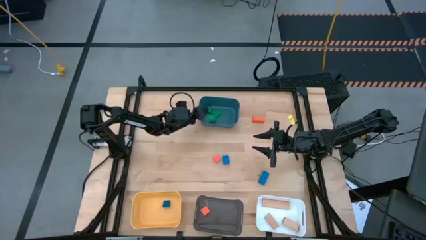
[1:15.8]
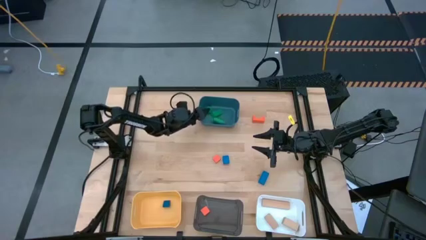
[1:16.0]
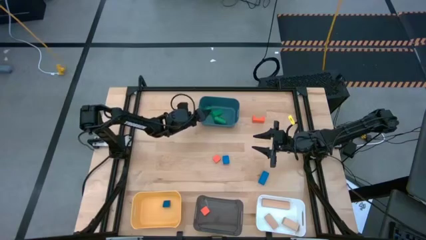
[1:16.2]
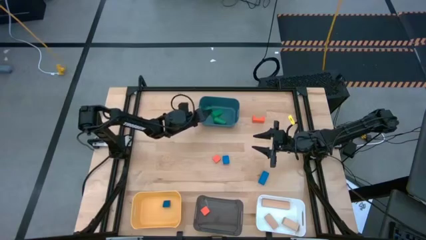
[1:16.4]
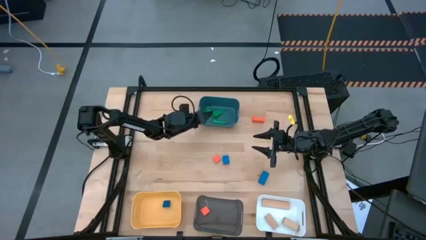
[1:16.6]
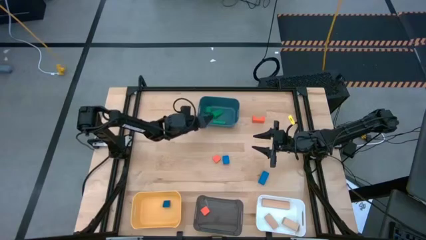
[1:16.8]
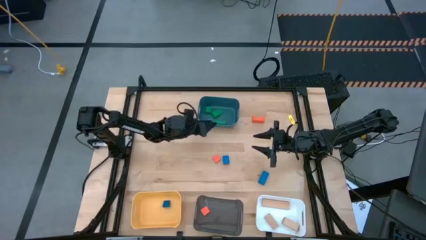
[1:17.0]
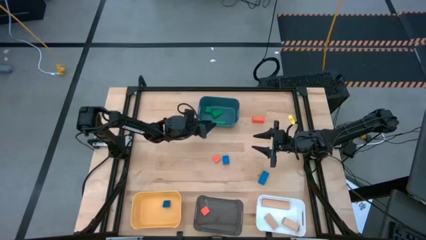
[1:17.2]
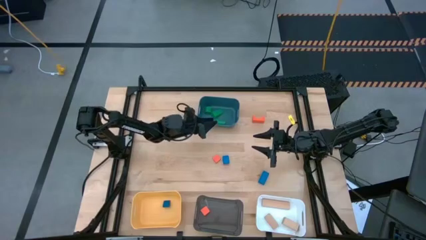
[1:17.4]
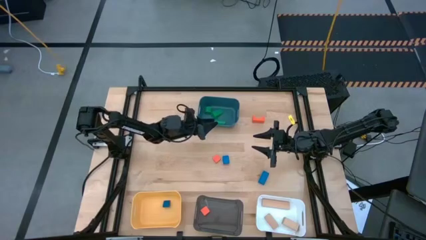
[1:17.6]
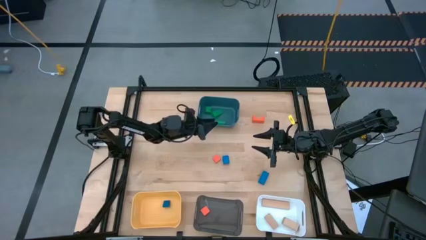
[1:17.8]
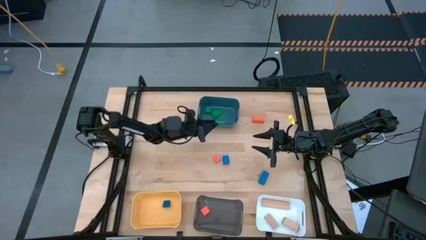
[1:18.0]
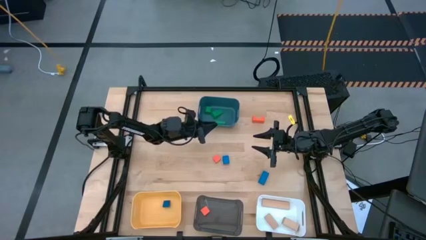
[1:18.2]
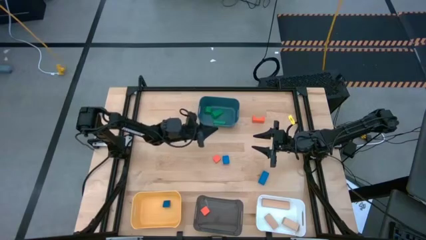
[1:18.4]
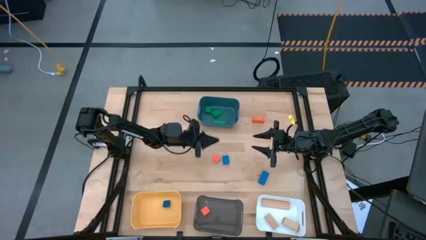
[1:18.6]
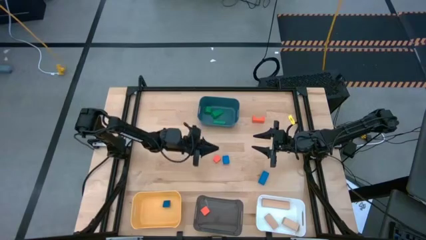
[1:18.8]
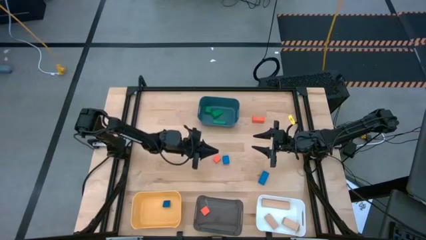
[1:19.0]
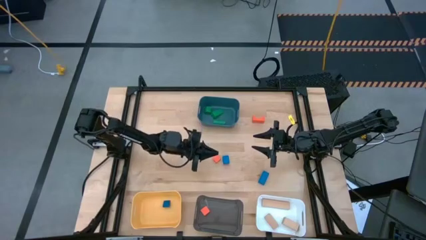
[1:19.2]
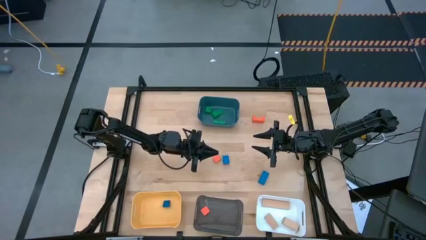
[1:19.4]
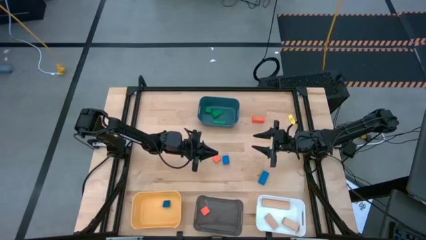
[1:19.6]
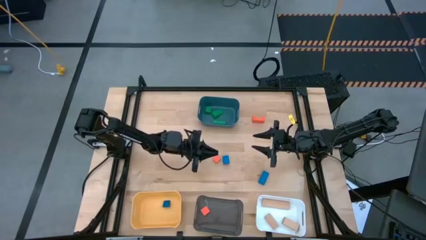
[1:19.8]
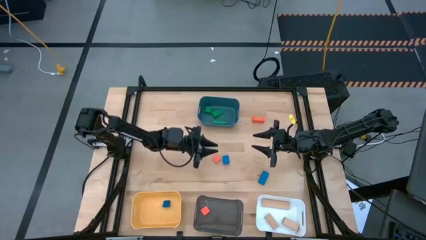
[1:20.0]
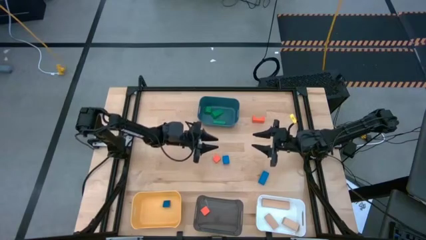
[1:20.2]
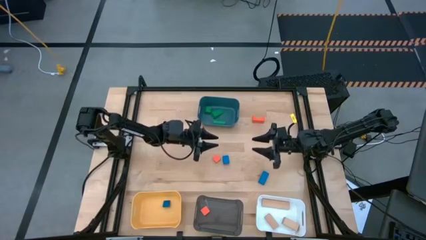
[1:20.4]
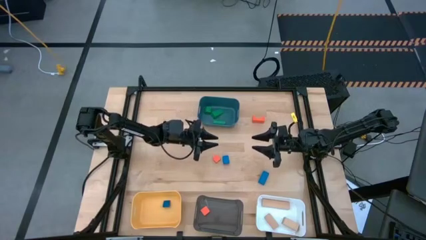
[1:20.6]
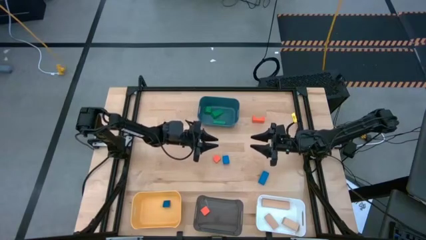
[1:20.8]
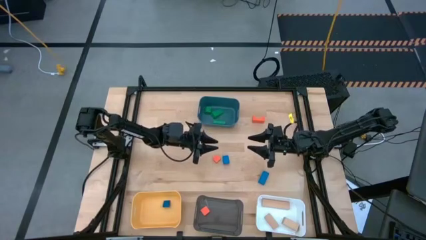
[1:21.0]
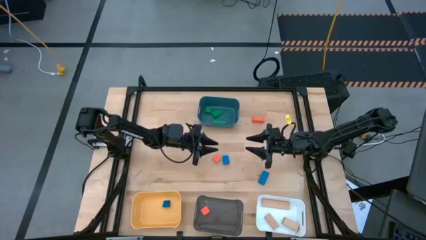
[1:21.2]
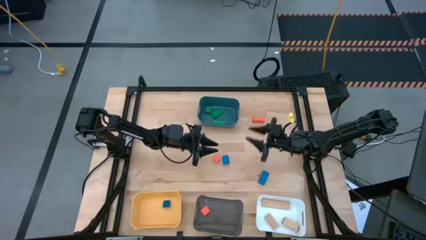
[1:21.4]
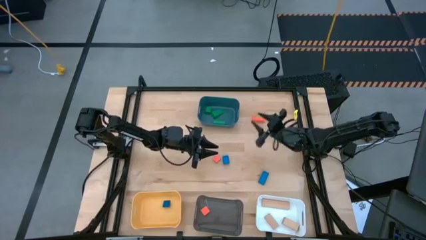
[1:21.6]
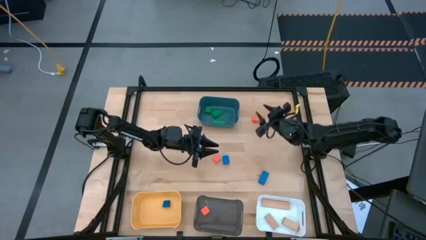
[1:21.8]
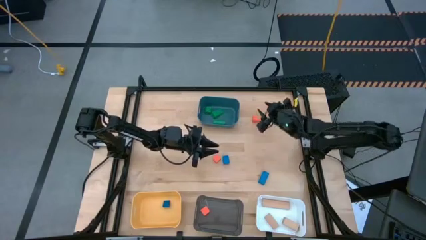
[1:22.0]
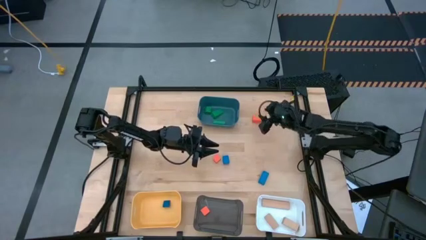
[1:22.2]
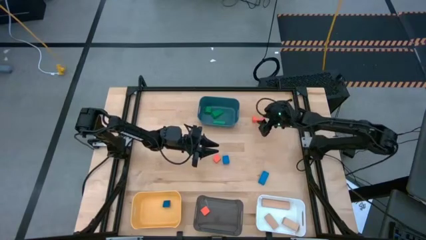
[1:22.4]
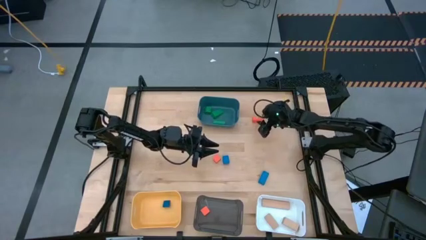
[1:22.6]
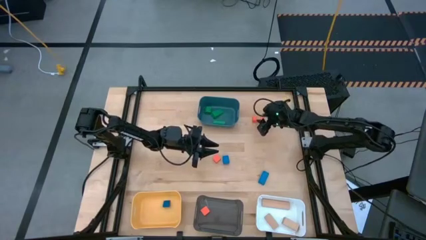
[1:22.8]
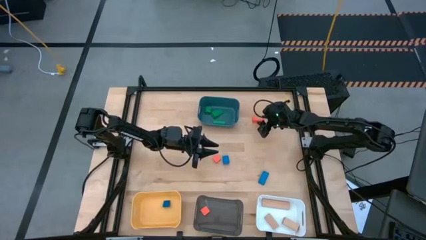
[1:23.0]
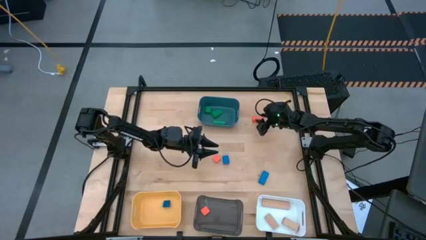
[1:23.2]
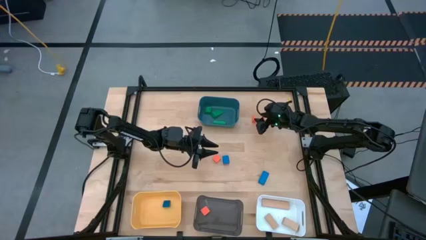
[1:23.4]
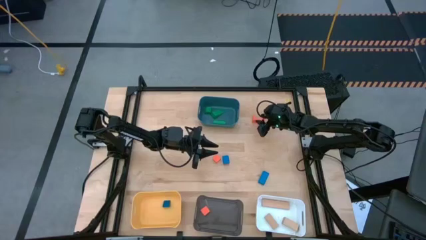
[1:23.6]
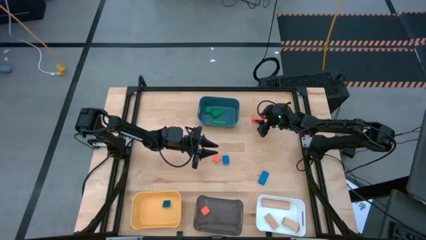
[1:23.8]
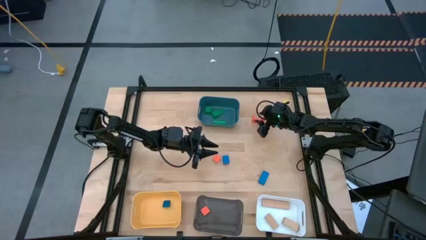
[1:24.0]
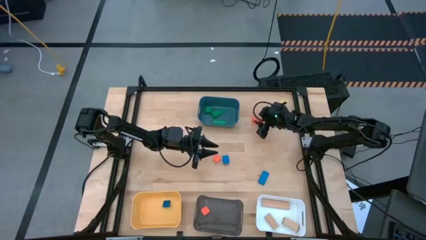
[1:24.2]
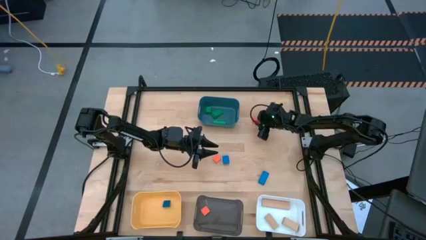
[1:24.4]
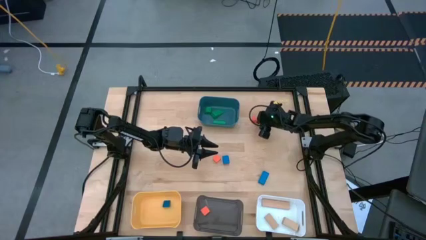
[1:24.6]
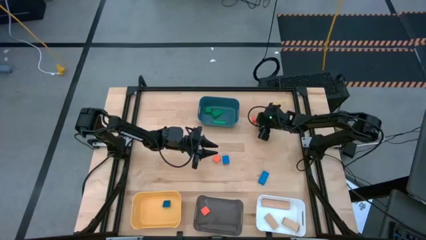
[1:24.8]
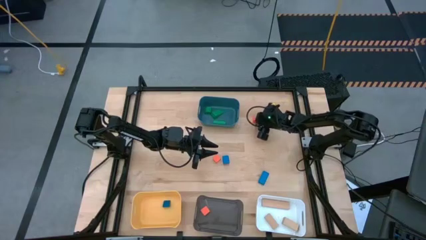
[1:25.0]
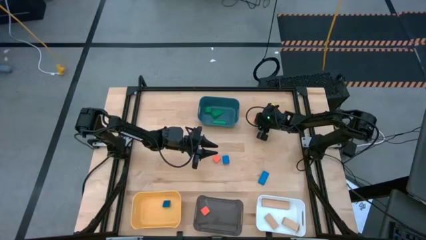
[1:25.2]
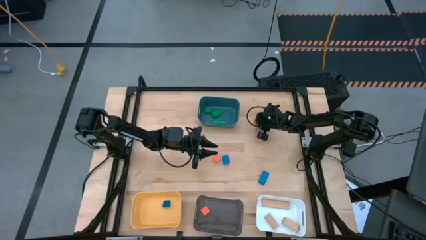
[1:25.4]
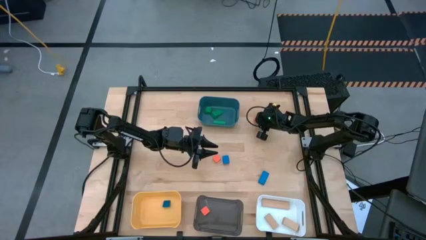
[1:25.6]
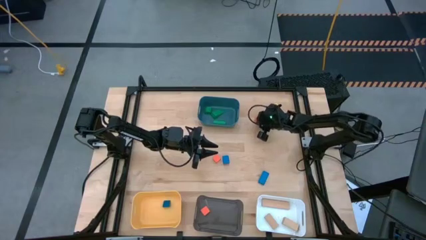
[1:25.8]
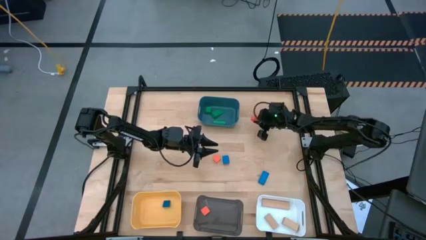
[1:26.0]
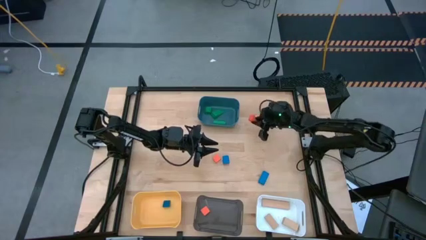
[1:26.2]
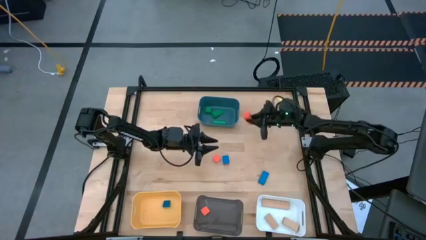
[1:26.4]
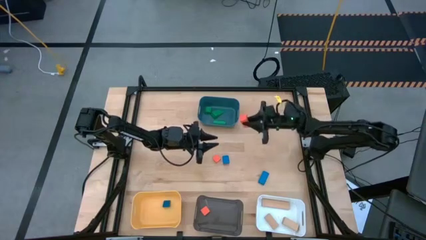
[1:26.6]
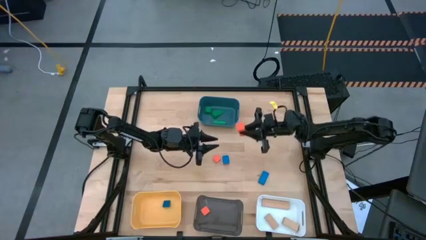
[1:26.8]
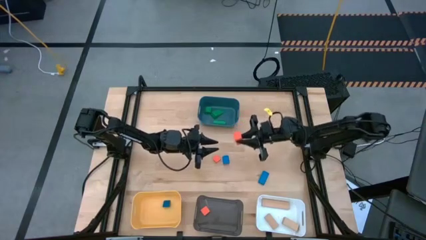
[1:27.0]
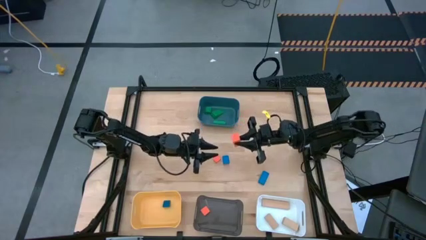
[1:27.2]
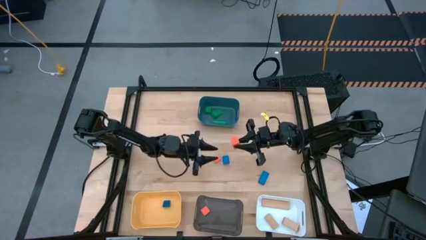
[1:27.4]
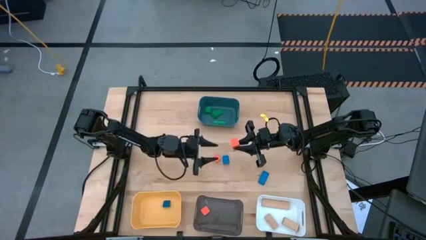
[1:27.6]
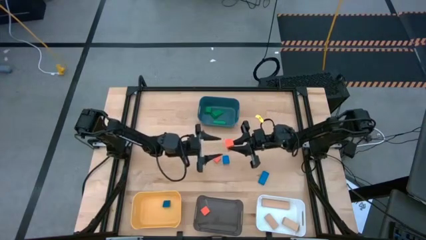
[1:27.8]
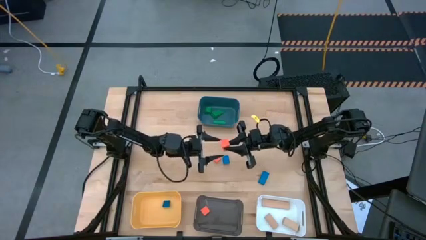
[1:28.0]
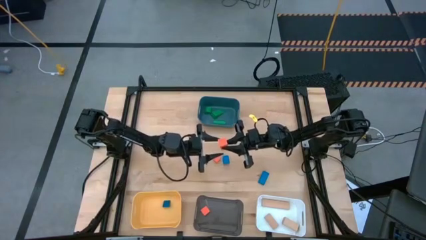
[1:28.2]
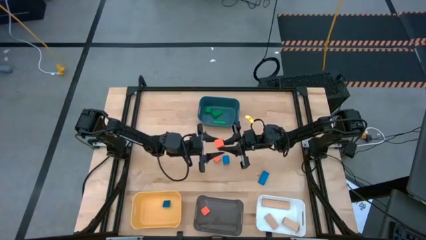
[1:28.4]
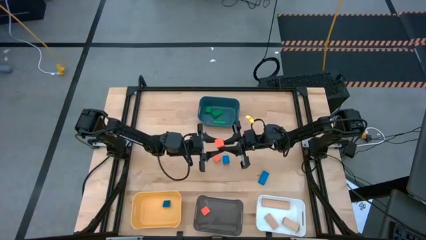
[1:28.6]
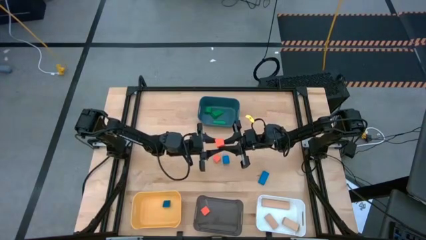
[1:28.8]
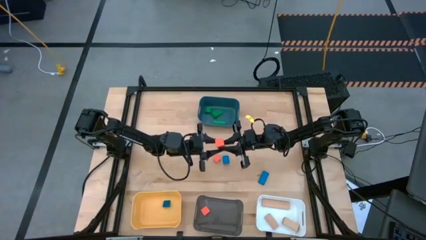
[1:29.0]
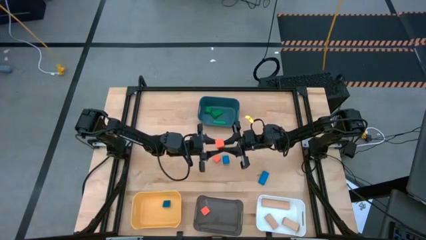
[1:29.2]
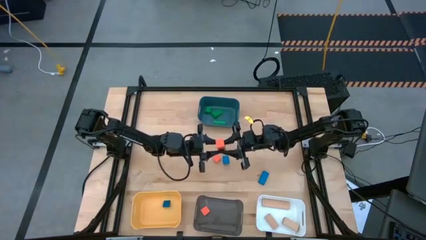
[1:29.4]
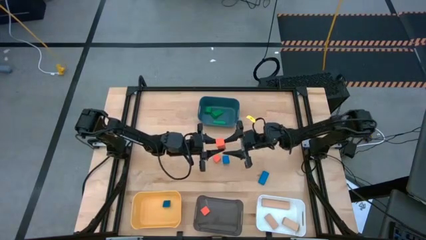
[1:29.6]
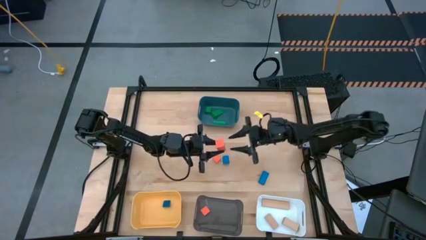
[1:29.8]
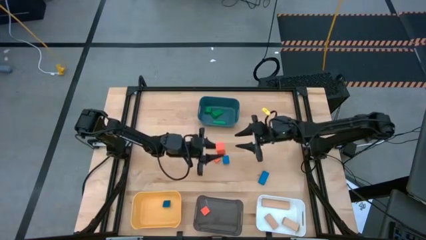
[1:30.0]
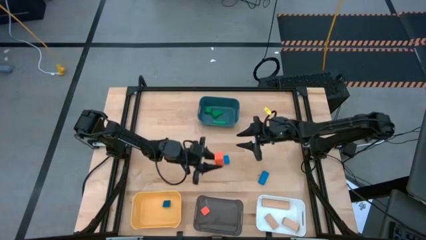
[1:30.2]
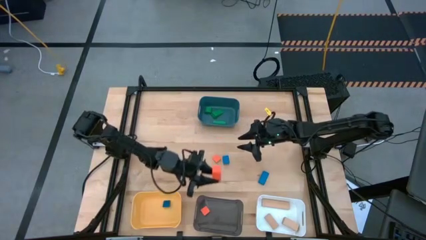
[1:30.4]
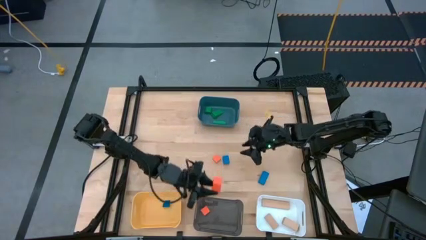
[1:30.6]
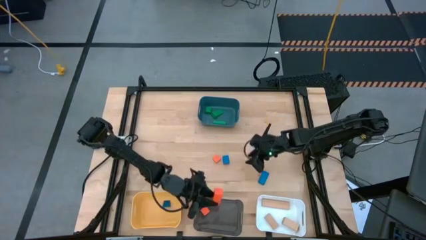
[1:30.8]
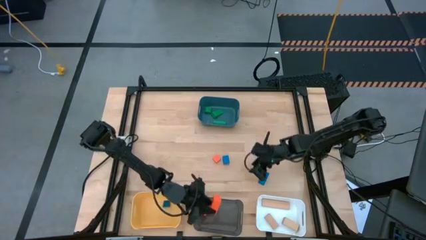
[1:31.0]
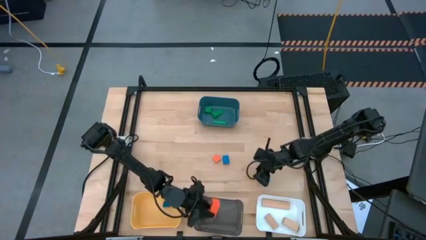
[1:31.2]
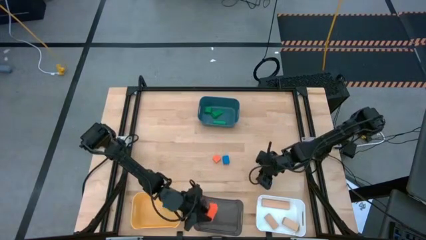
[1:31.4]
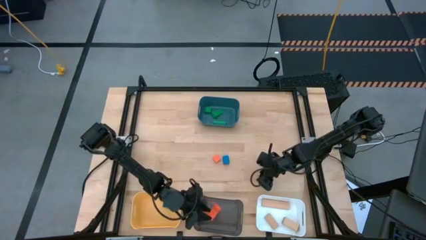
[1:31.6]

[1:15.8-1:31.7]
Task: Sort & place blocks by color
Put the top orange block into the black bin

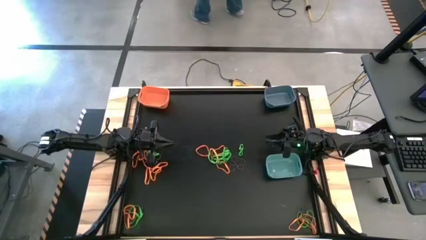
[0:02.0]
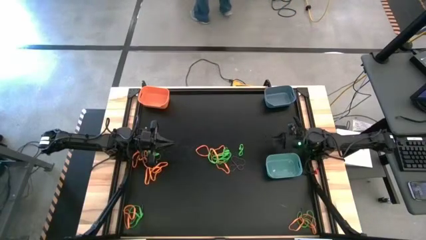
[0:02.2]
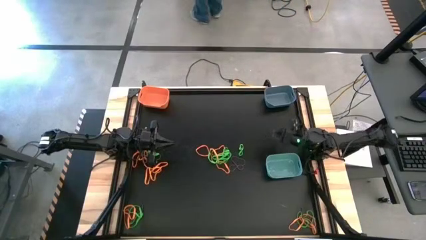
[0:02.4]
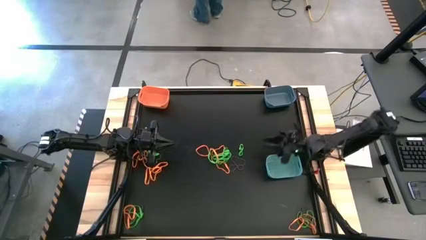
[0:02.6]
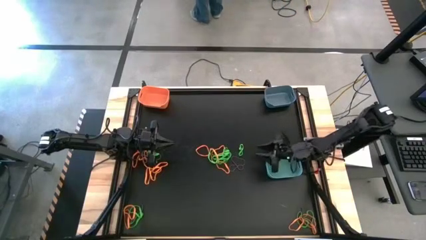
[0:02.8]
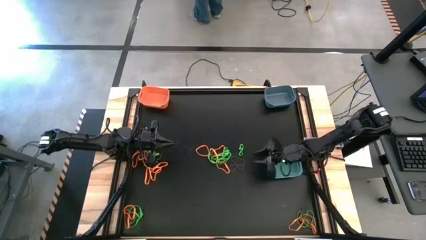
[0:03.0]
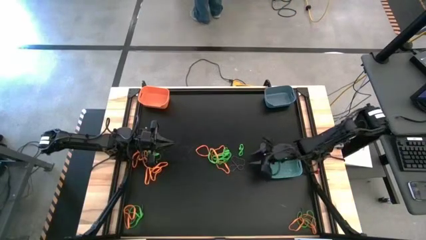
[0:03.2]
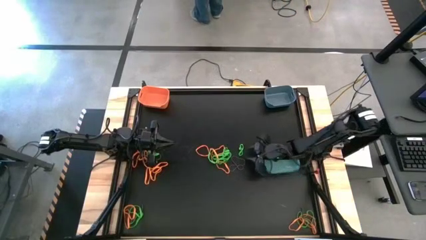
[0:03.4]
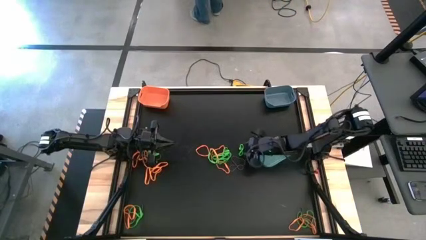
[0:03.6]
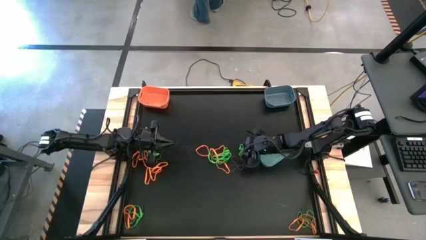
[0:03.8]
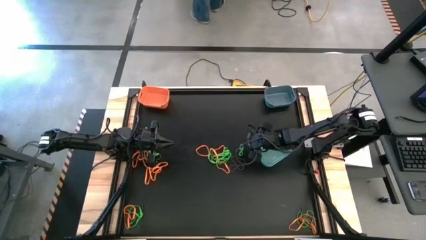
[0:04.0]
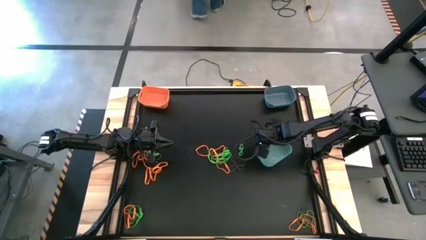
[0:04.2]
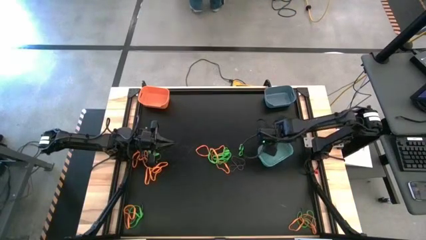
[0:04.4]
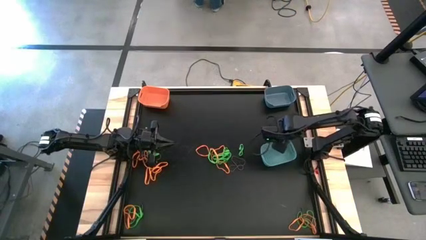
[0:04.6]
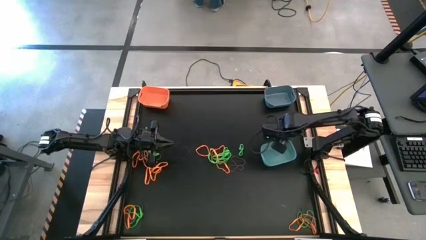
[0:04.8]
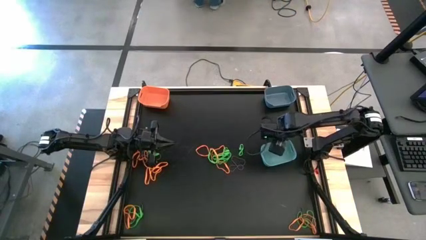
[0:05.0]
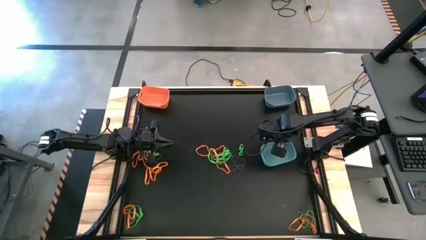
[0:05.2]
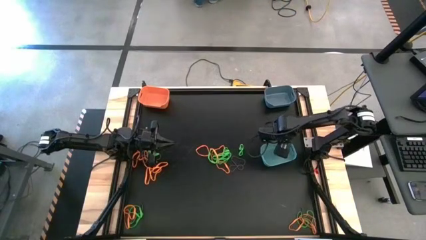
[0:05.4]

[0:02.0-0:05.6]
Task: Sort rubber bands into baskets
Adjust the green bin
